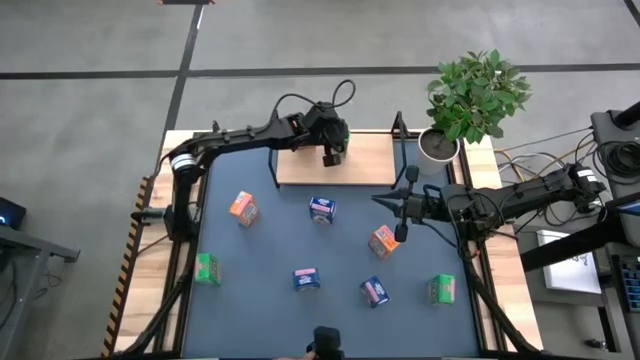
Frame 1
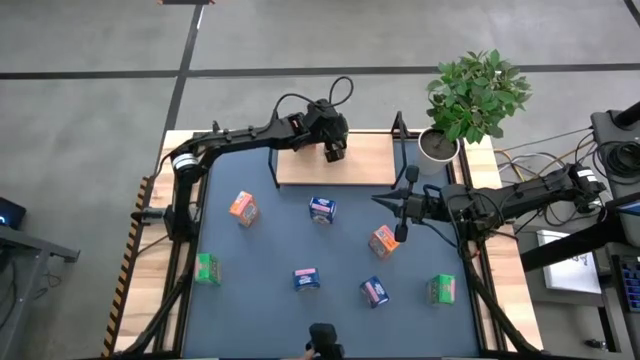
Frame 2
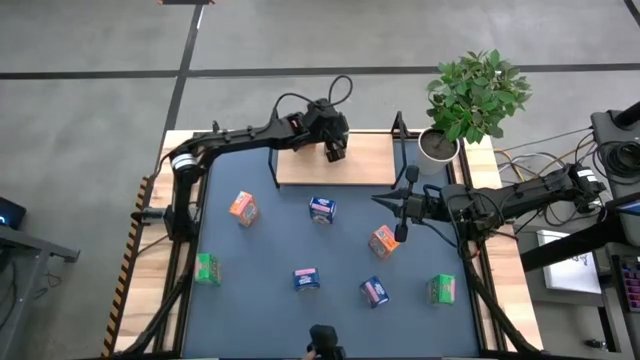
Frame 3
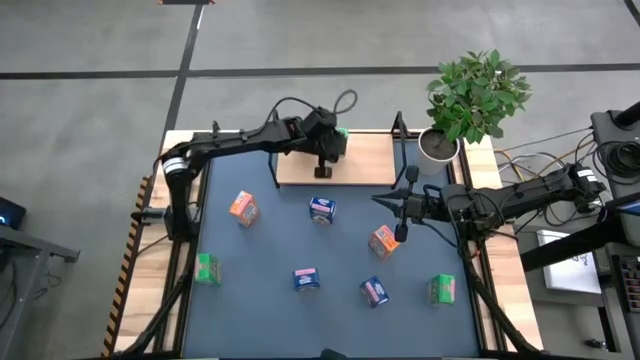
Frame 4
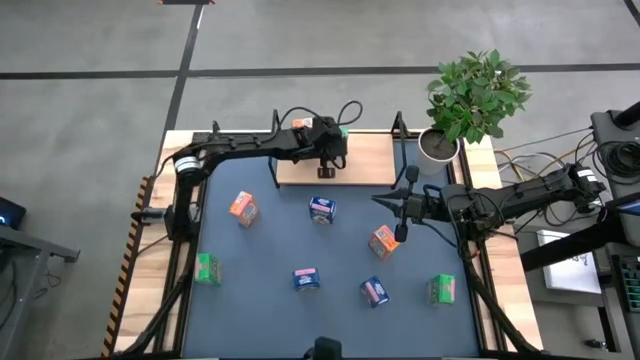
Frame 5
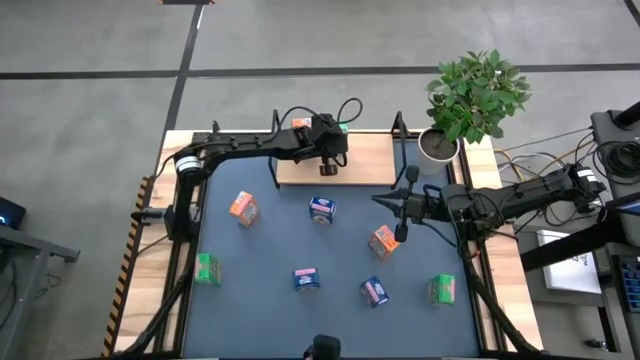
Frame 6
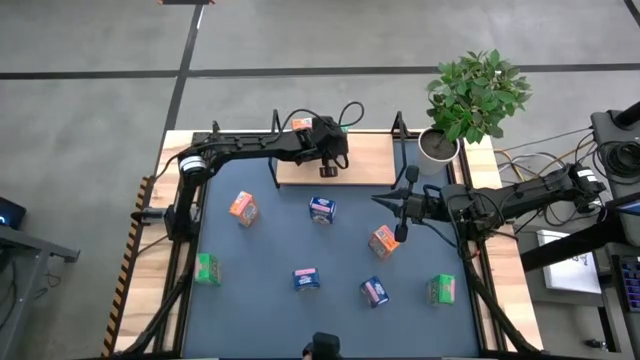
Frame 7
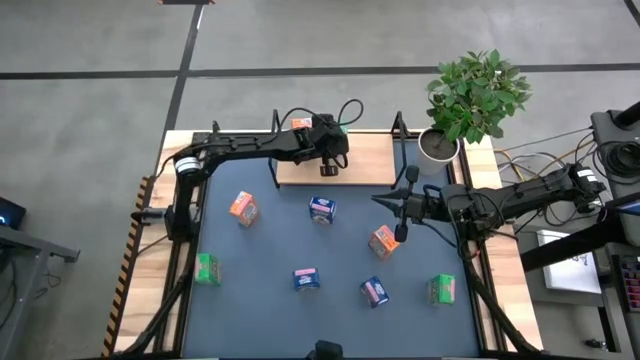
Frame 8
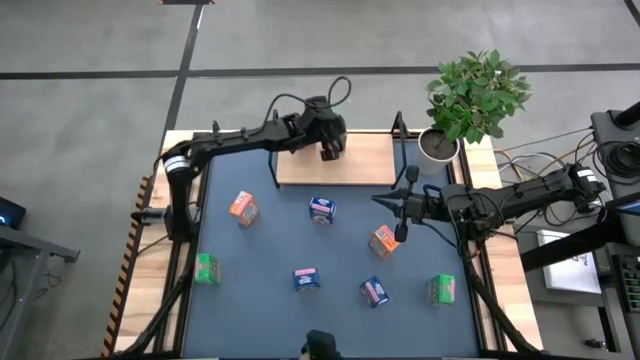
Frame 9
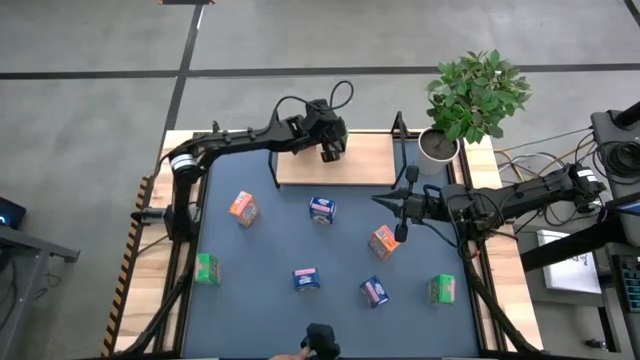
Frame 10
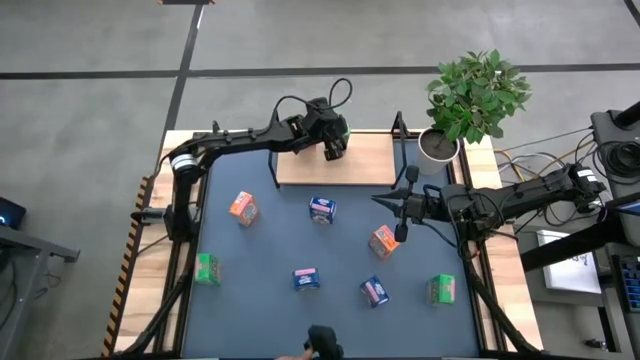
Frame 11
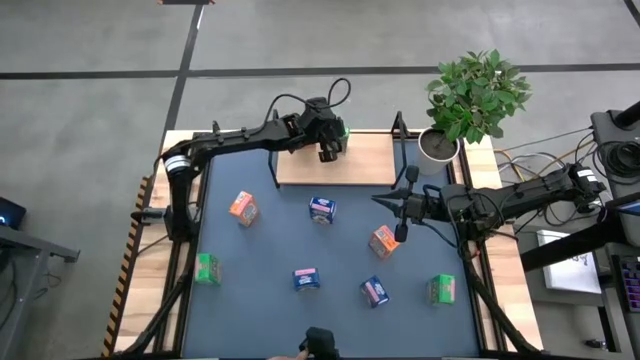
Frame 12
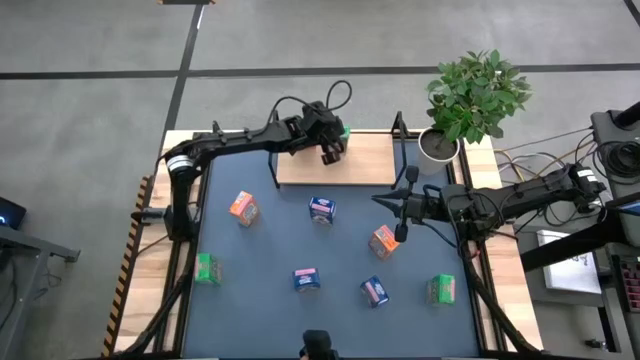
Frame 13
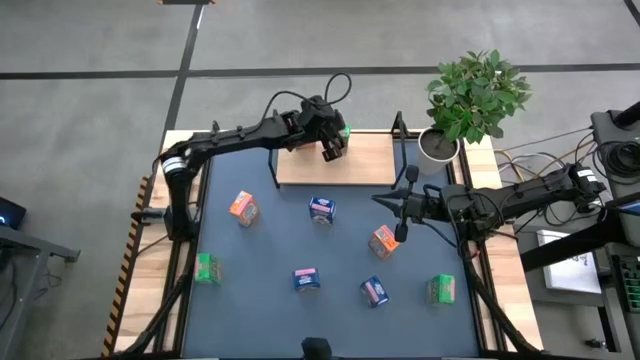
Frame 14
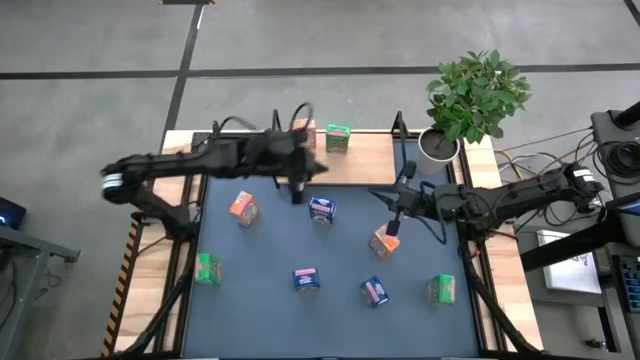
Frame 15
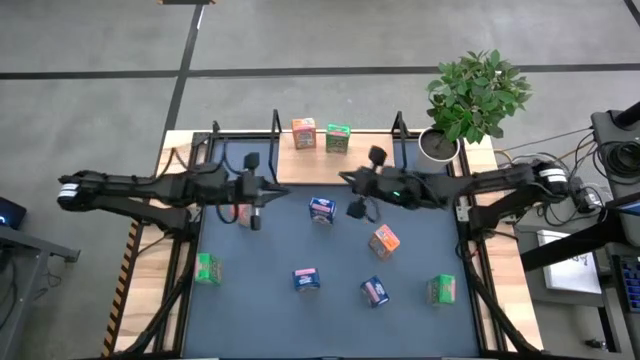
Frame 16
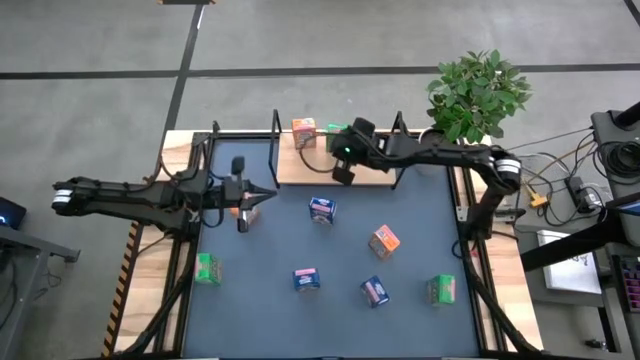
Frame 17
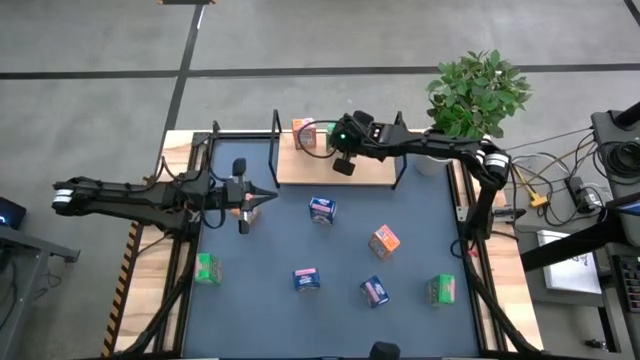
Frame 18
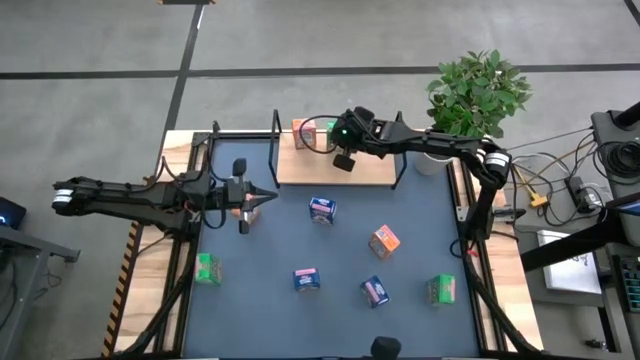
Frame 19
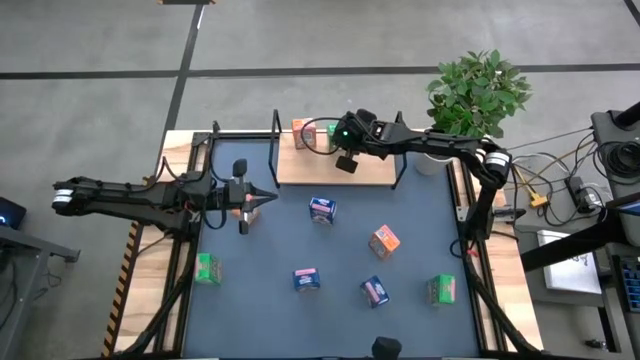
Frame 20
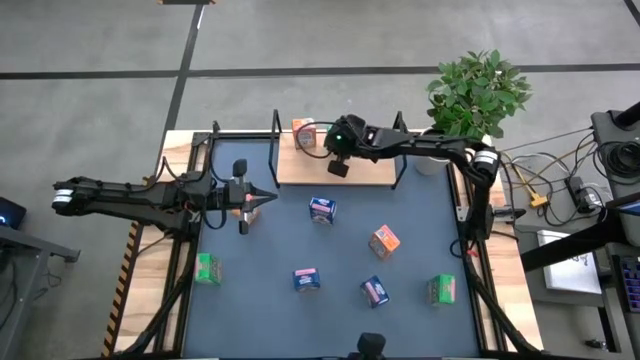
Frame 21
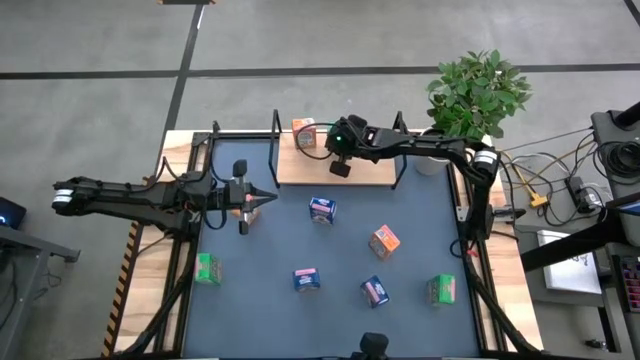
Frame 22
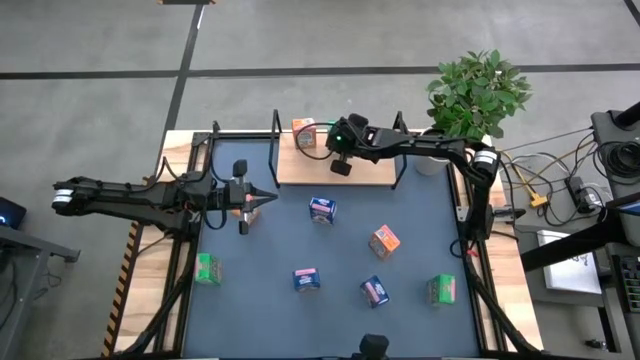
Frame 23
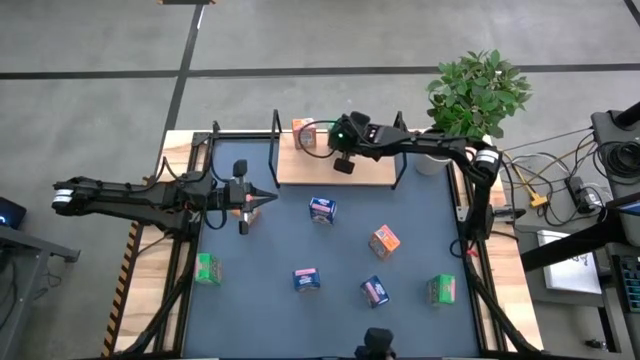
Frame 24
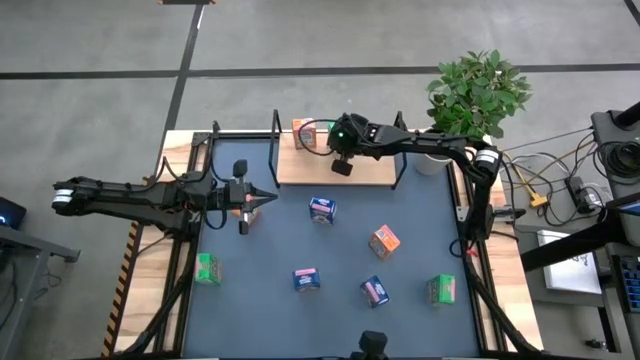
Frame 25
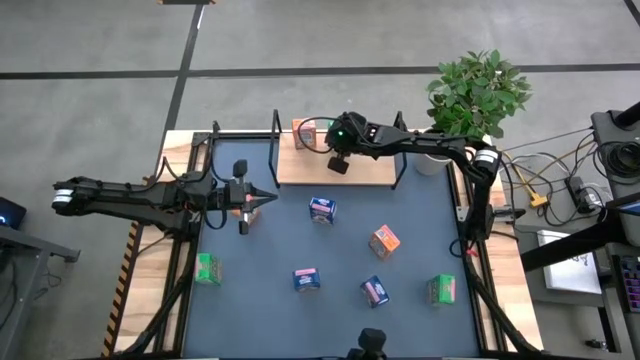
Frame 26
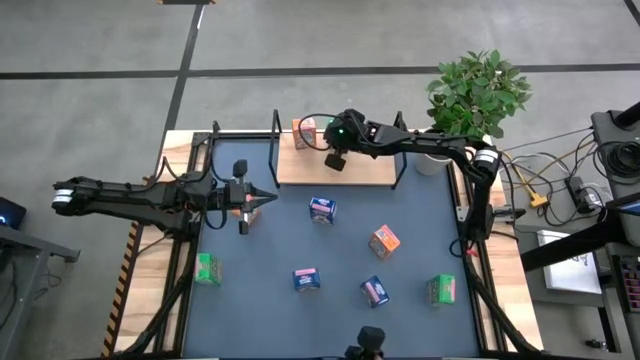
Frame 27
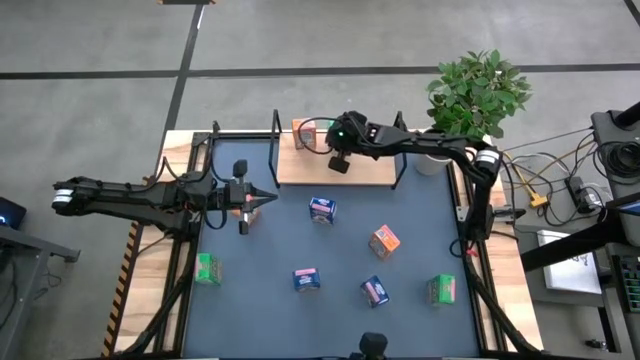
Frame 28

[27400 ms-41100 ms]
Task: Stack cereal on shelf
Put the center green cereal box on the shelf

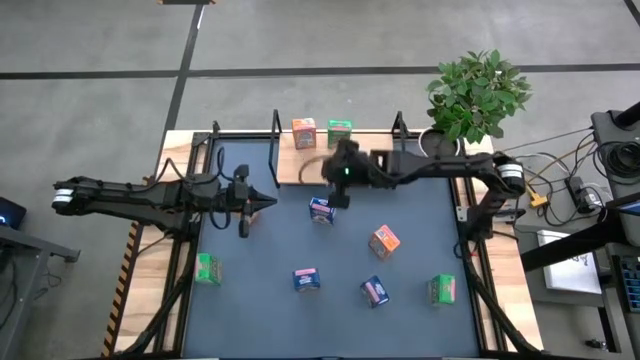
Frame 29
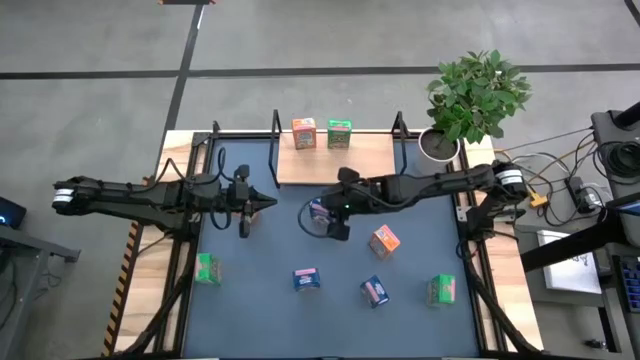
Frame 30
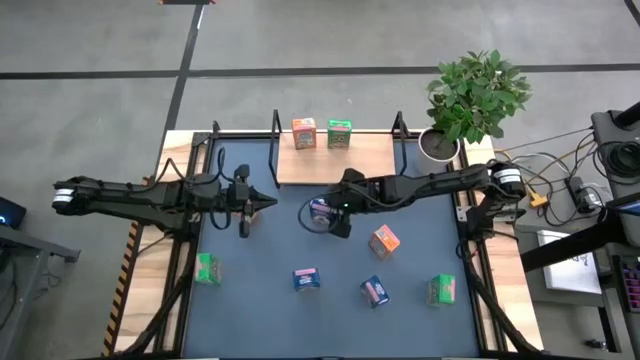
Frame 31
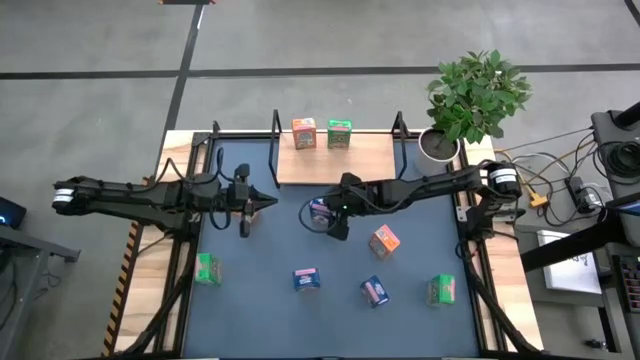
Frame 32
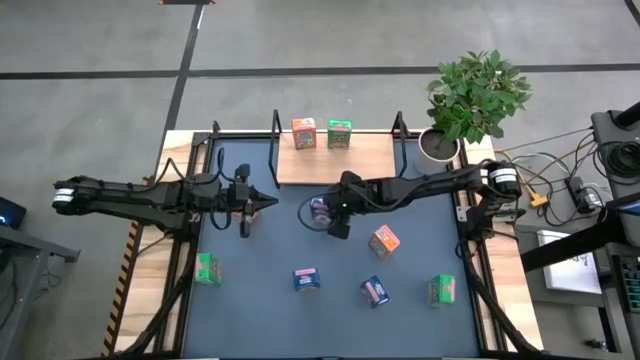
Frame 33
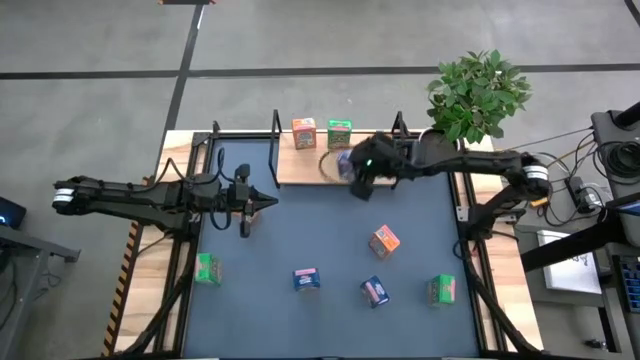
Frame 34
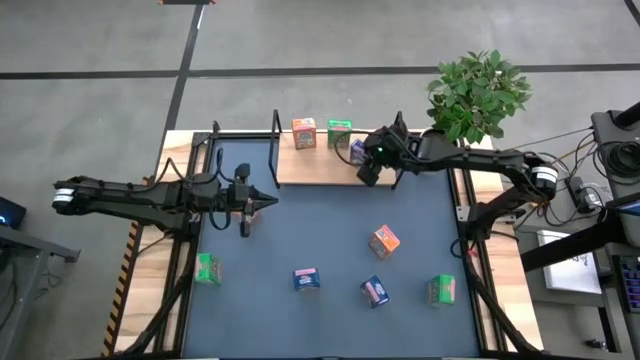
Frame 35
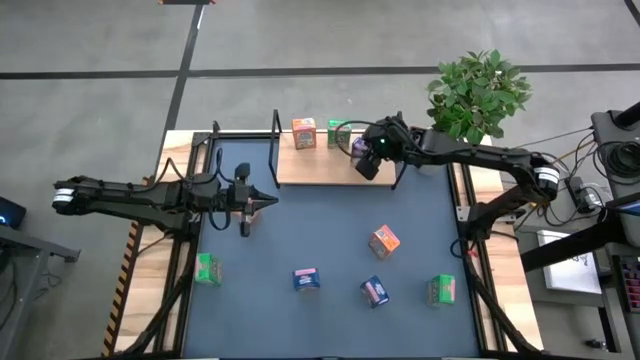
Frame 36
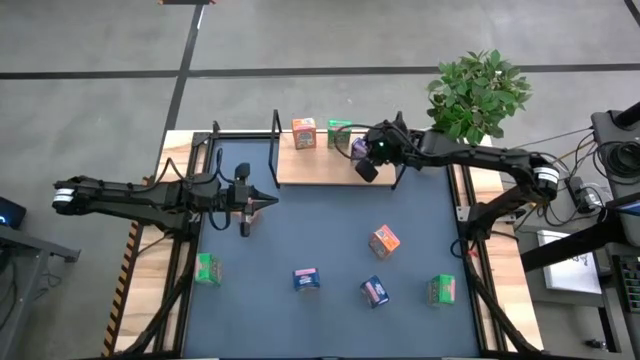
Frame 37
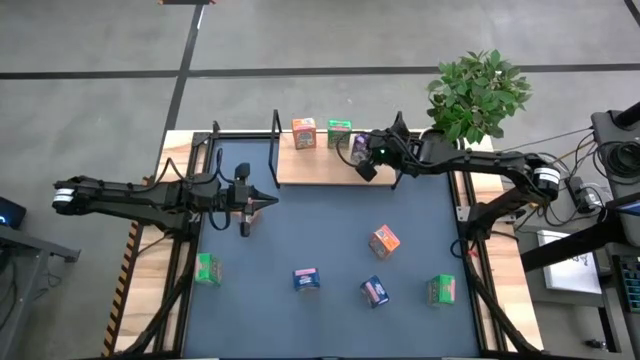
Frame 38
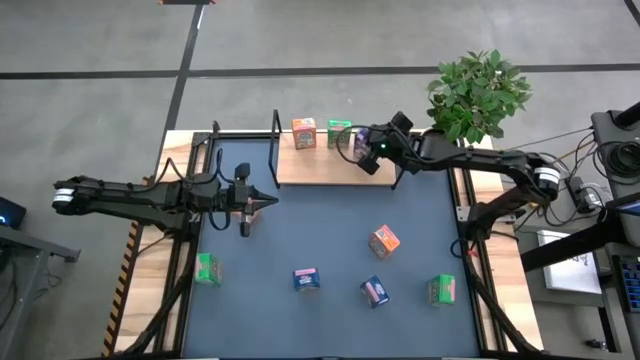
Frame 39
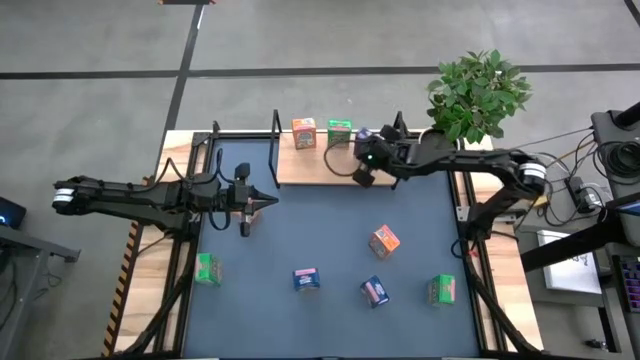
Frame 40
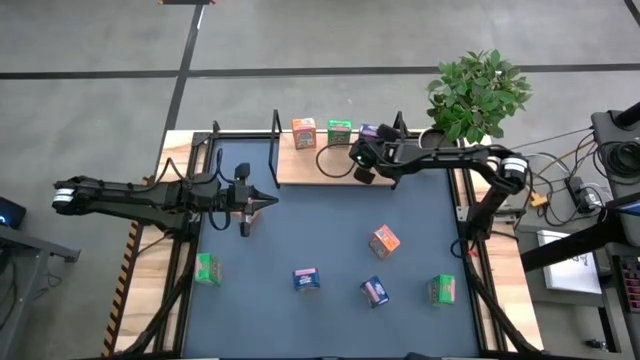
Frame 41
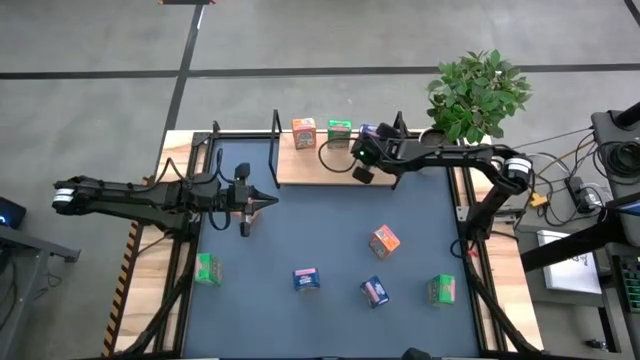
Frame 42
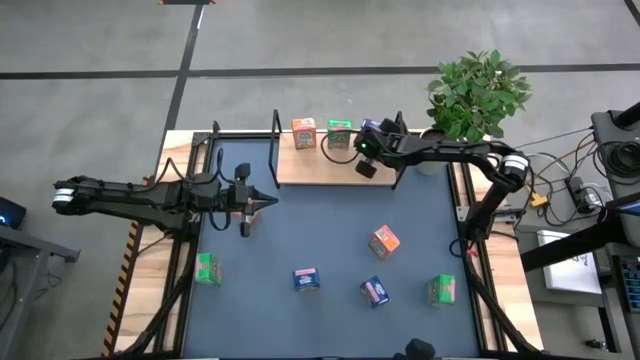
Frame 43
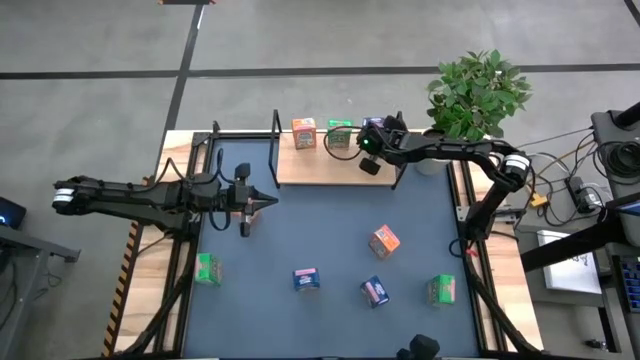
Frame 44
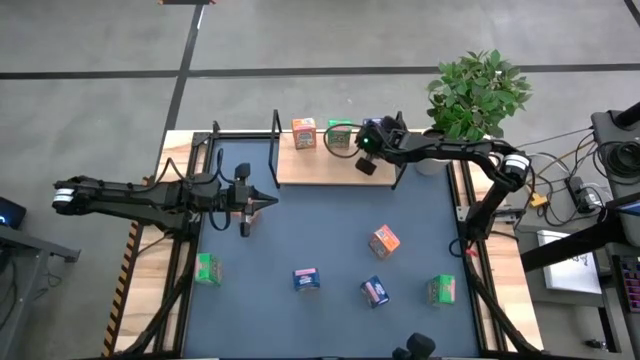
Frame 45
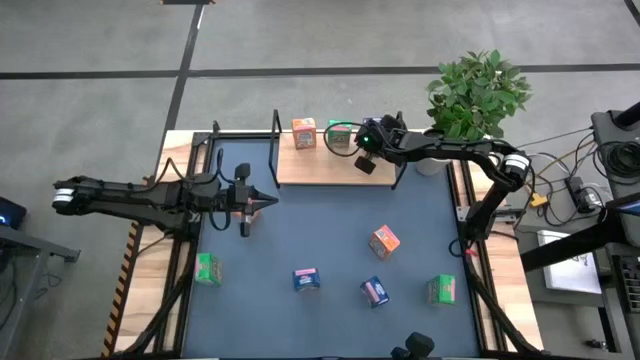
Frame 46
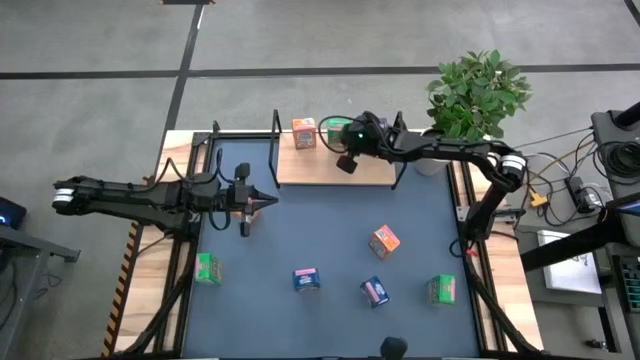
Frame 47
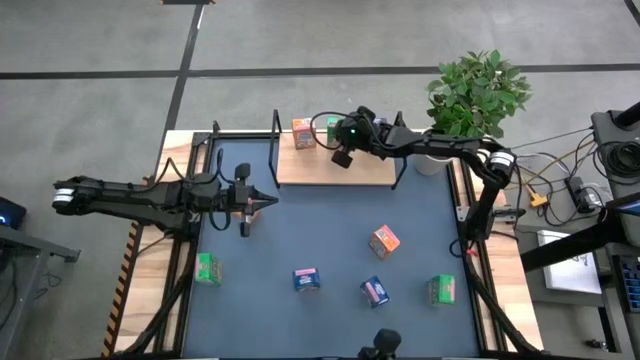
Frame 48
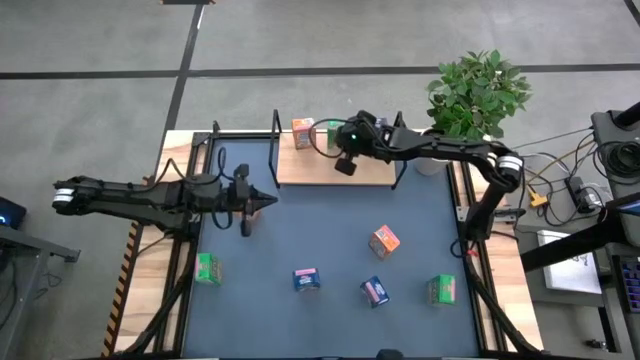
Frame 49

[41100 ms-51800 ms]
Put the top center blue cereal box on the shelf
